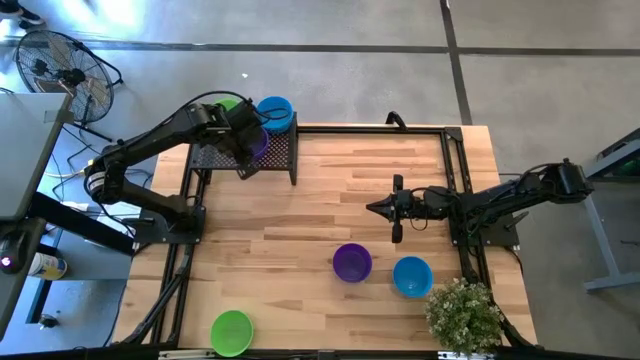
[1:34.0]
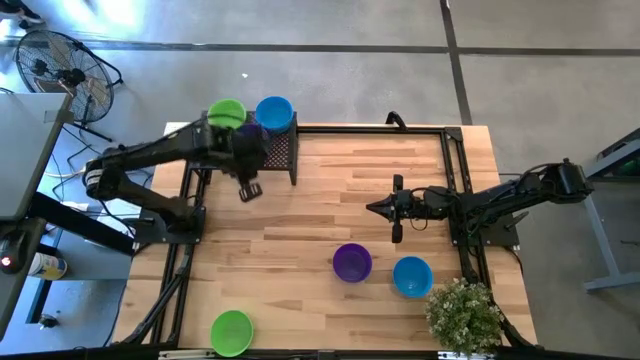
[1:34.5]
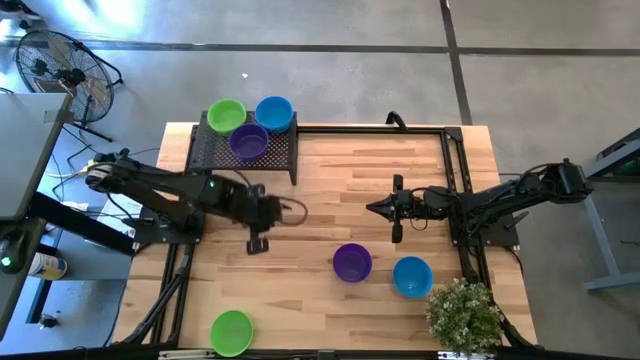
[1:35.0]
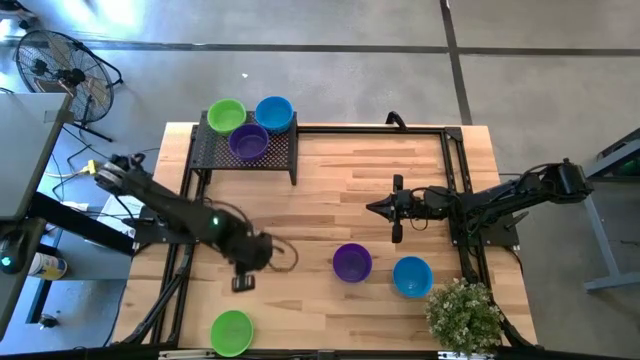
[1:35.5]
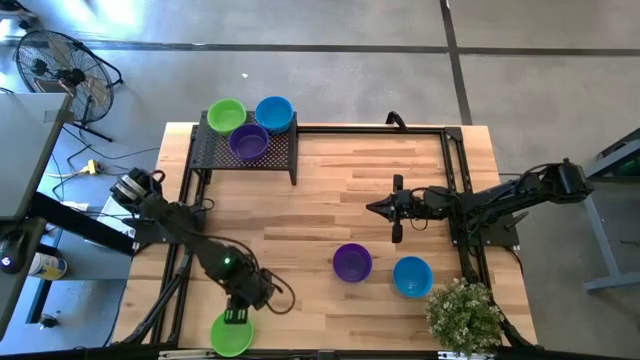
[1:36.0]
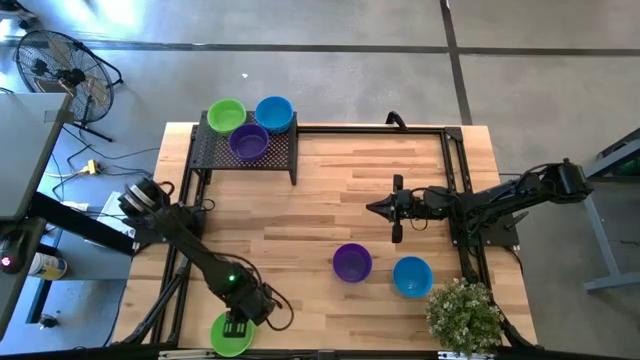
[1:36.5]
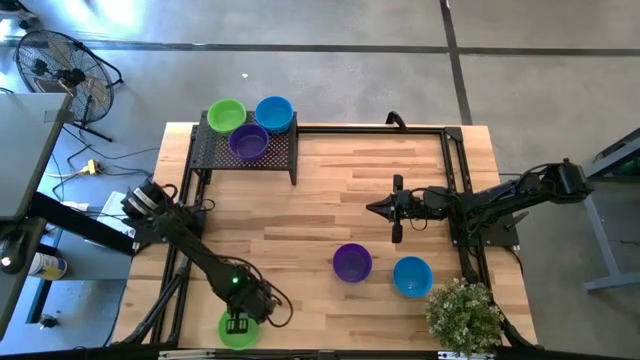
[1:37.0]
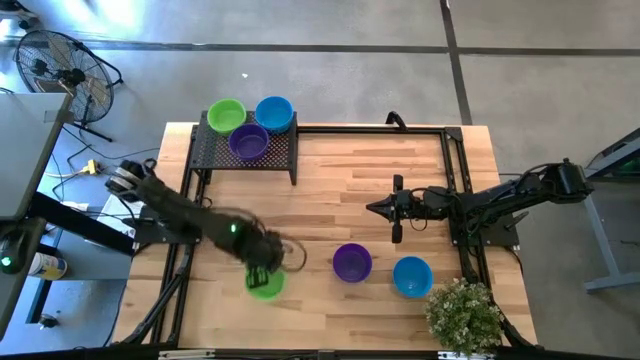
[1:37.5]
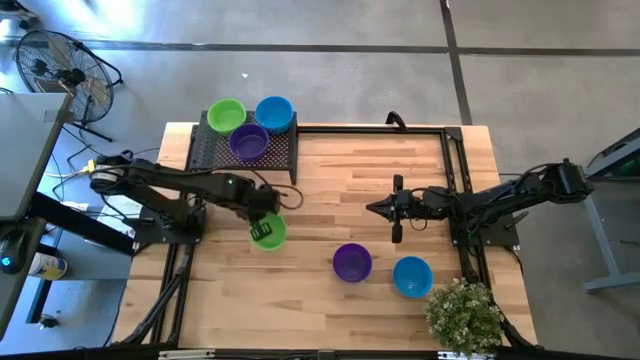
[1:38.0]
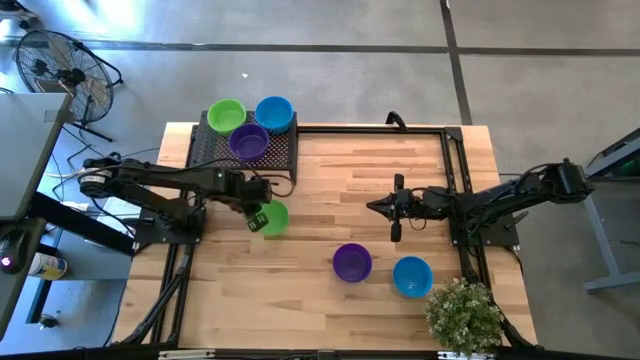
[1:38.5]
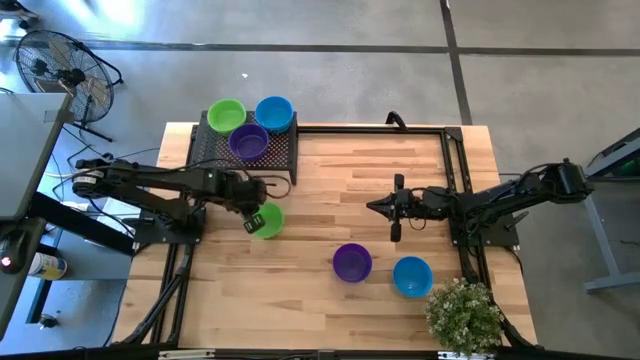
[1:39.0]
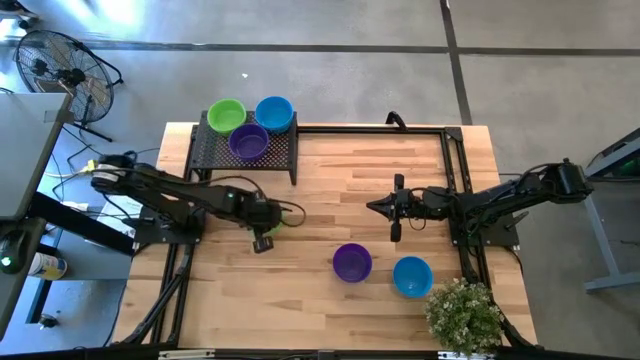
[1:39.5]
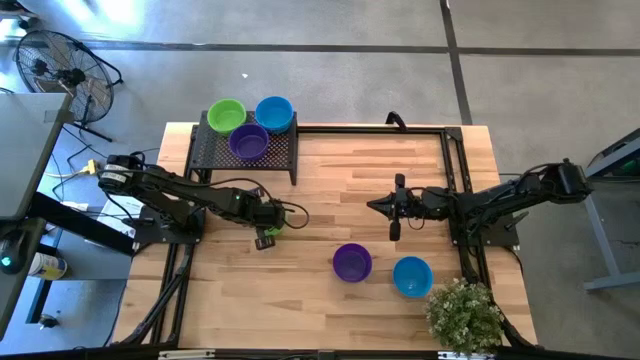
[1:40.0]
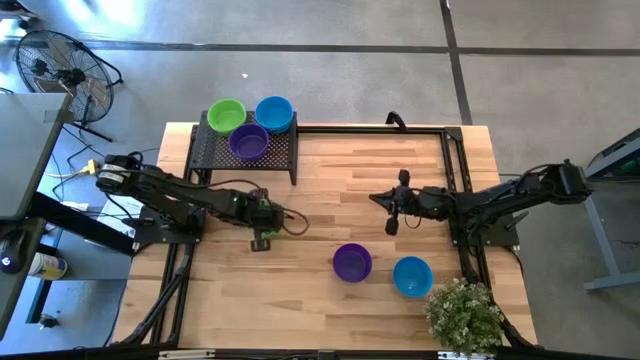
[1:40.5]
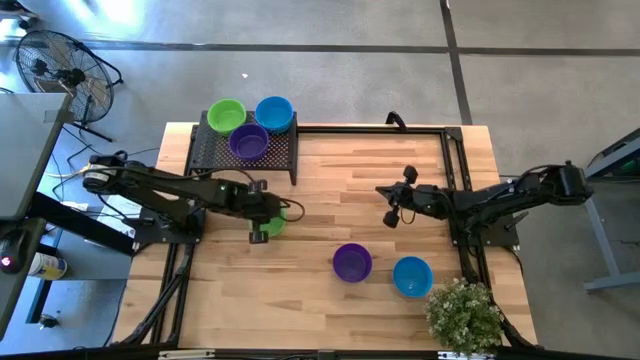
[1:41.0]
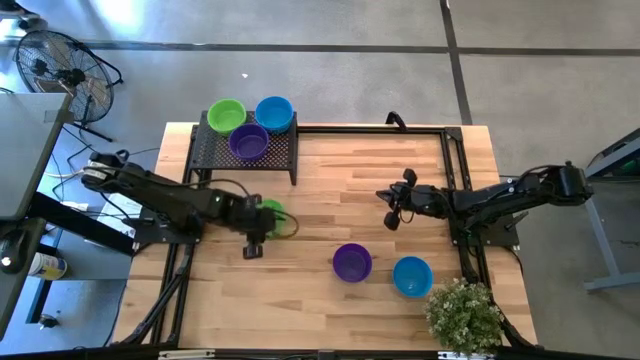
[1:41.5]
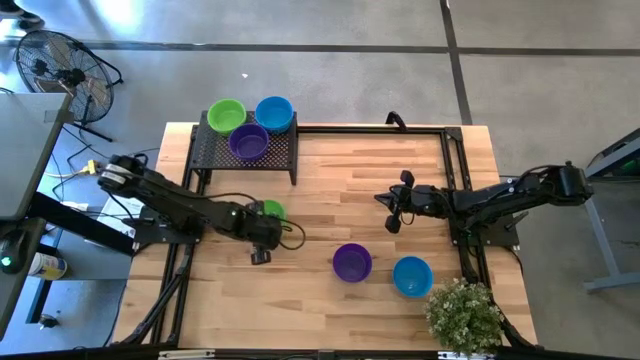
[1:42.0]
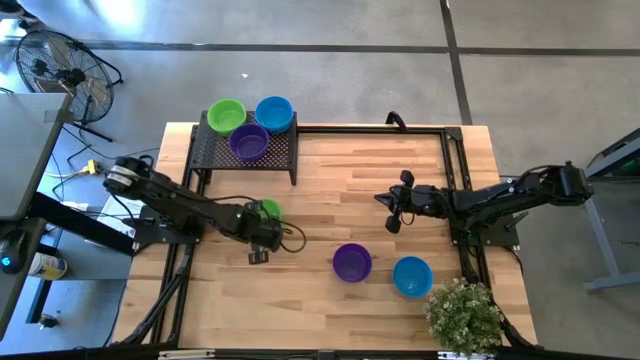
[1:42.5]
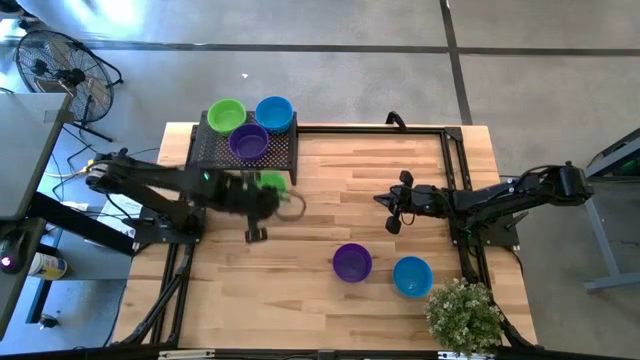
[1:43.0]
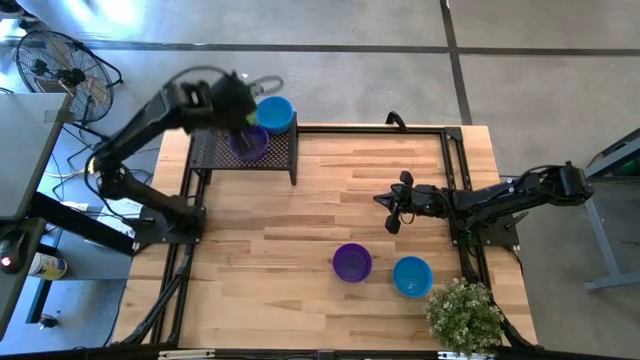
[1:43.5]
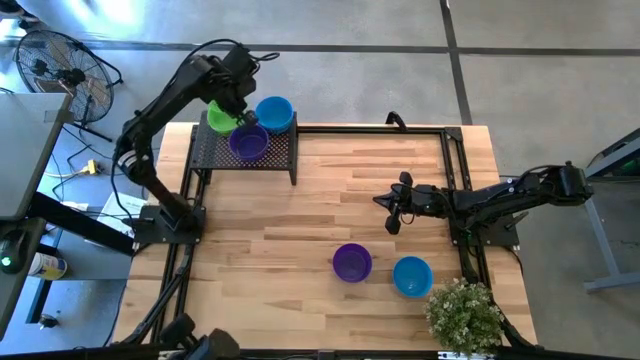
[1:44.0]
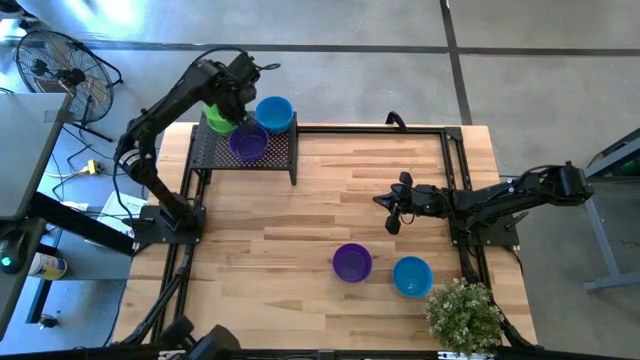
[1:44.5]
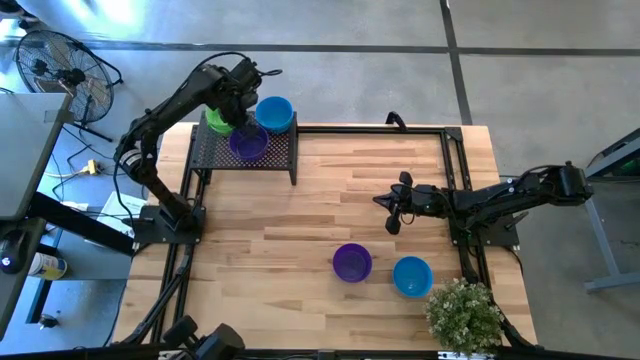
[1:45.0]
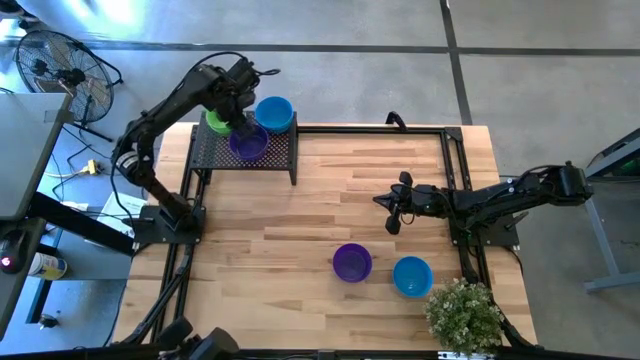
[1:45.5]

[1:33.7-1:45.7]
Task: Pick & Place Mini bowls
Stack the green bowl on top of the green bowl on the shelf

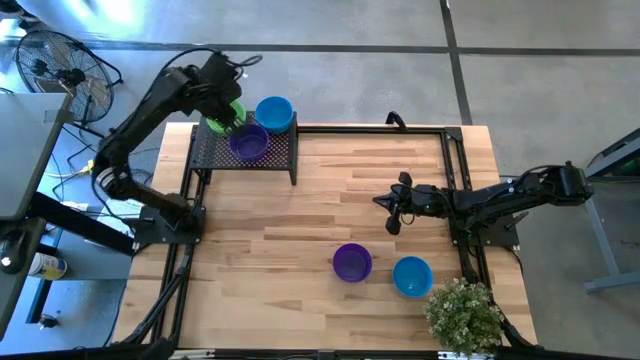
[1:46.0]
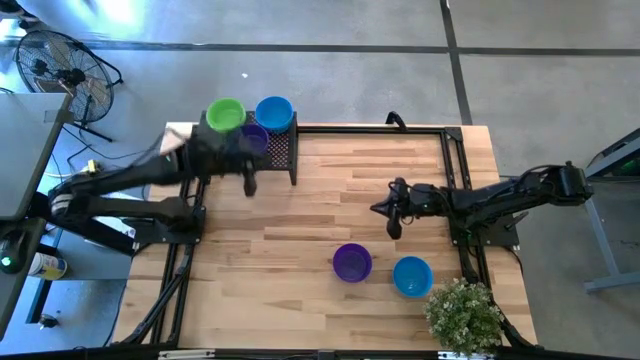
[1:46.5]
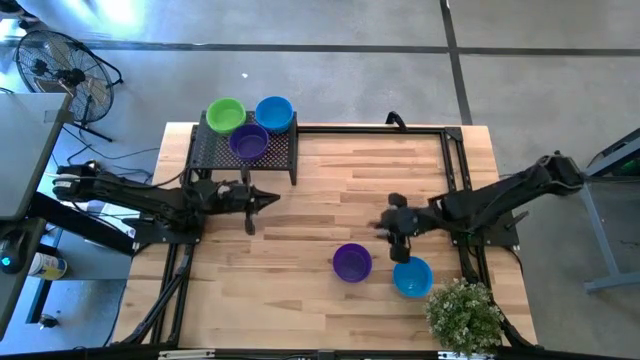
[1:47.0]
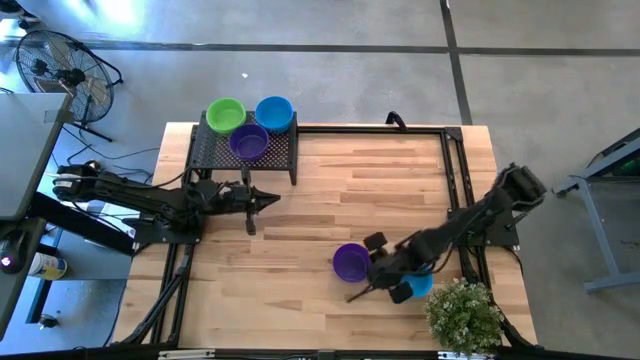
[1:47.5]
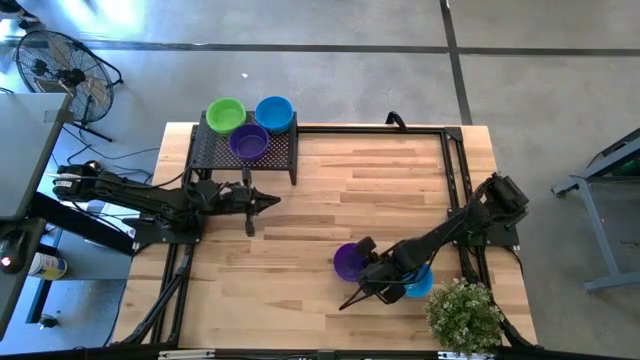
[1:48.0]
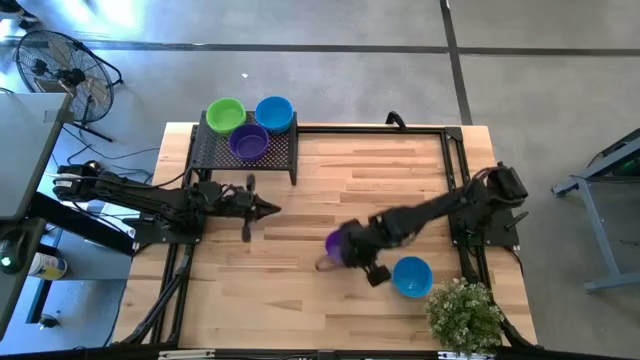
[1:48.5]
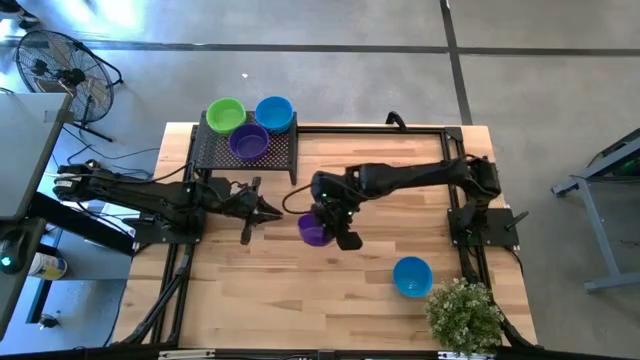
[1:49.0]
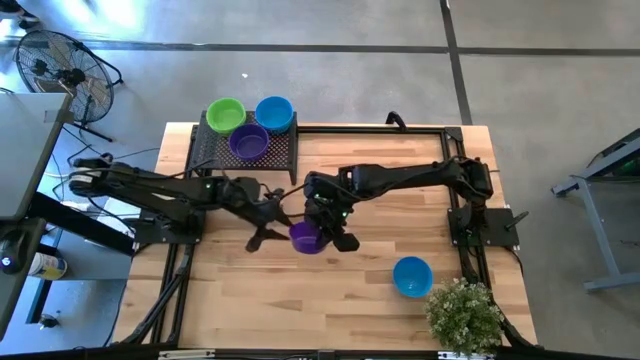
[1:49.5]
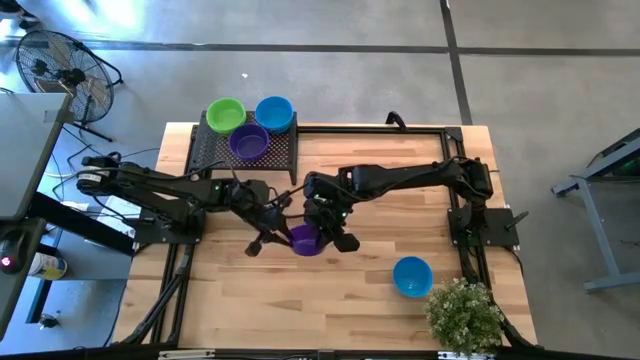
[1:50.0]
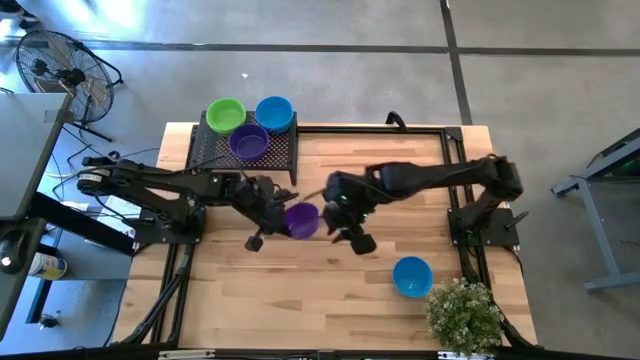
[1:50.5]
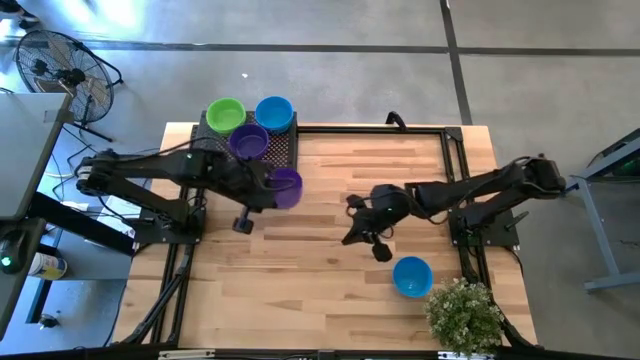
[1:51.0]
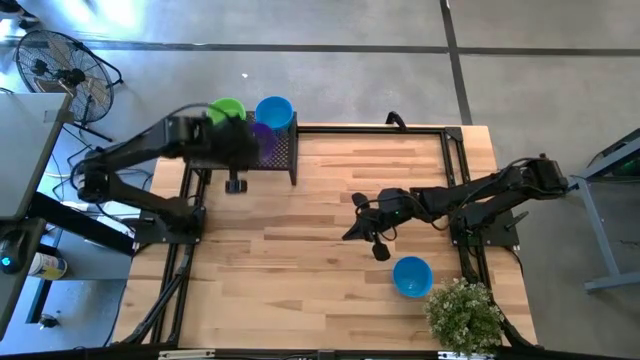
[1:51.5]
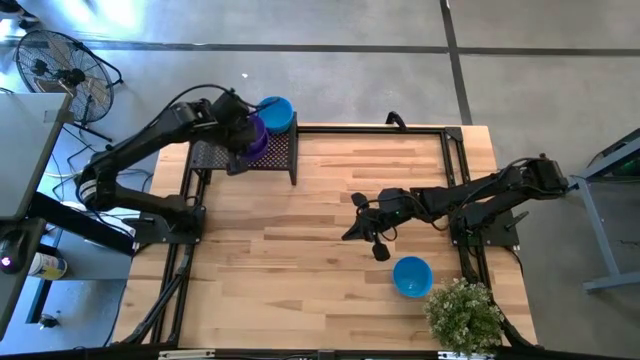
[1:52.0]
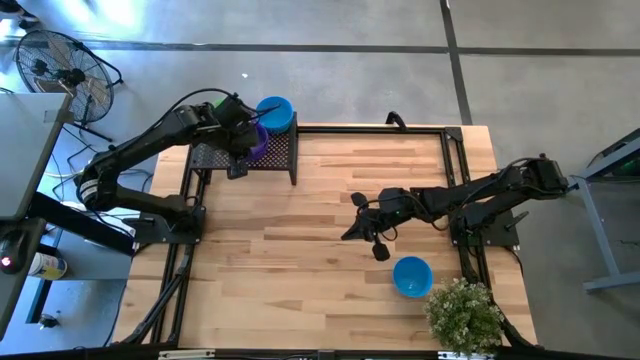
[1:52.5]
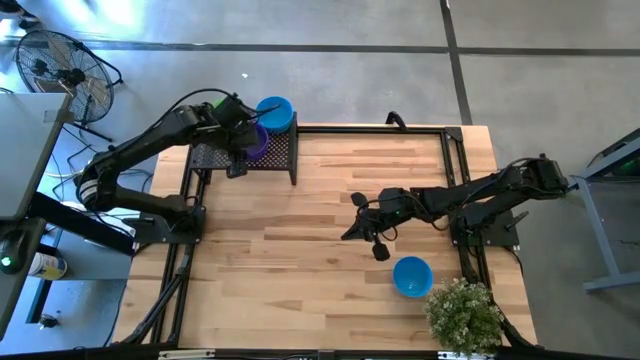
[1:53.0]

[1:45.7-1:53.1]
Stack the violet bowl on top of the violet bowl on the shelf

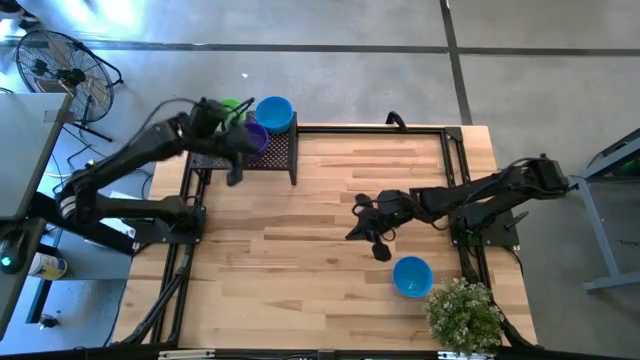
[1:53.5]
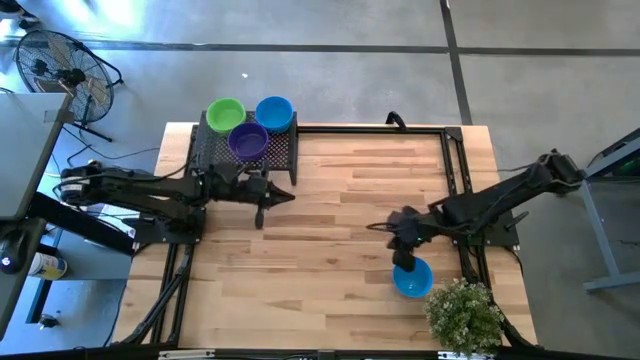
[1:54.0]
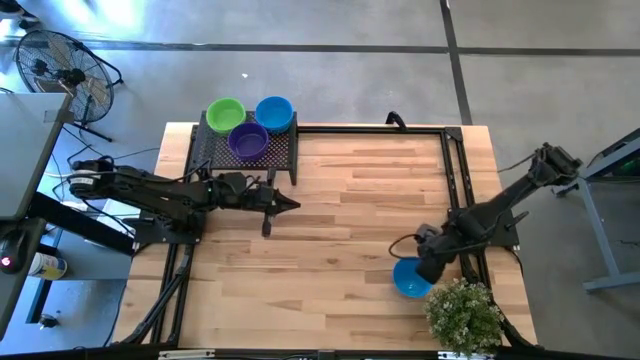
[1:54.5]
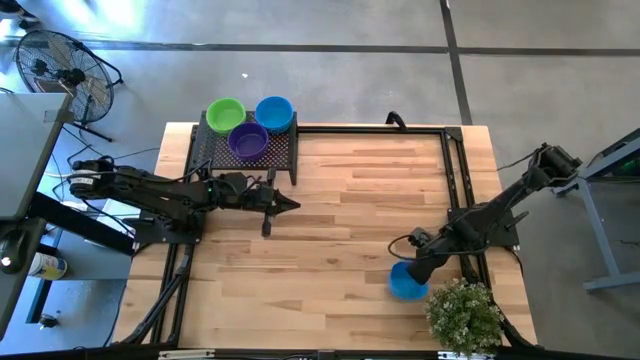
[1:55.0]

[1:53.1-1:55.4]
Stack the blue bowl on top of the blue bowl on the shelf
